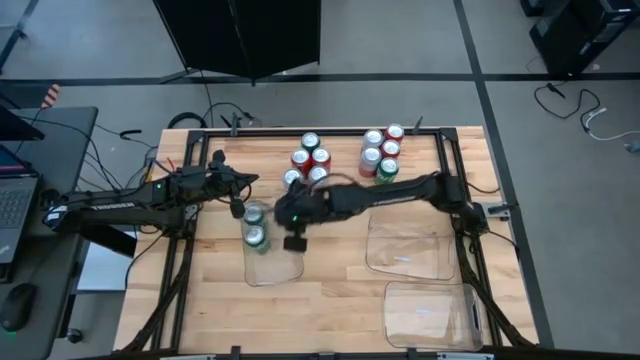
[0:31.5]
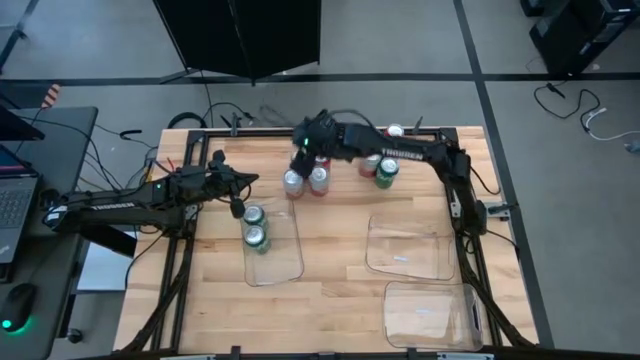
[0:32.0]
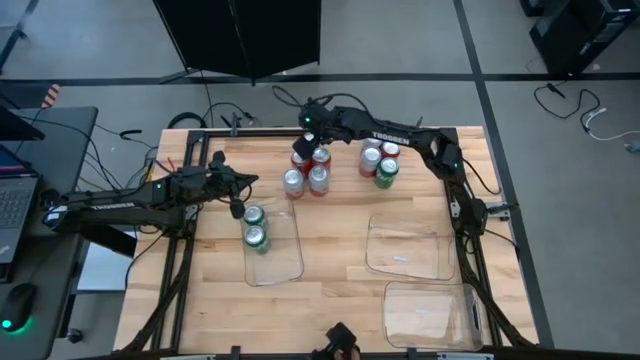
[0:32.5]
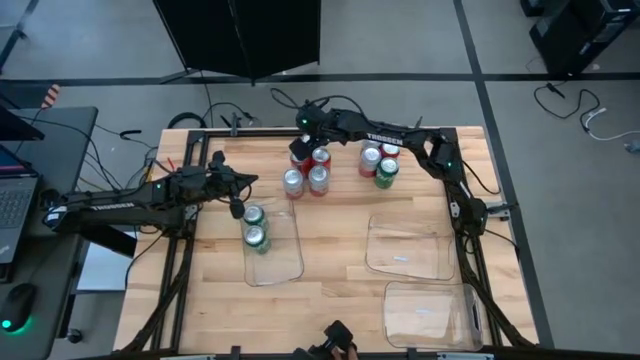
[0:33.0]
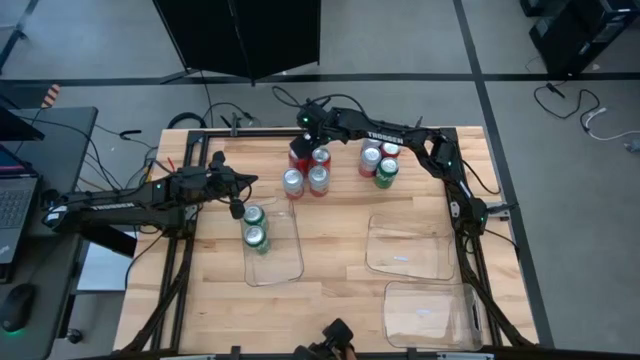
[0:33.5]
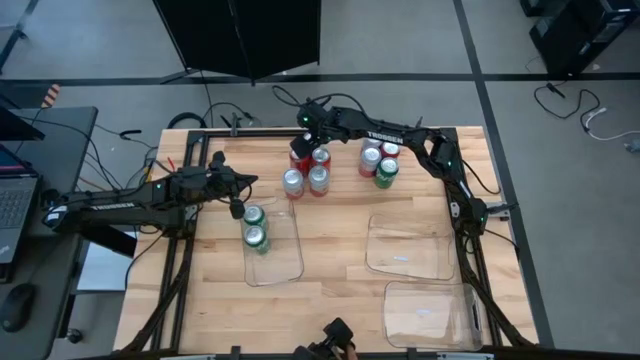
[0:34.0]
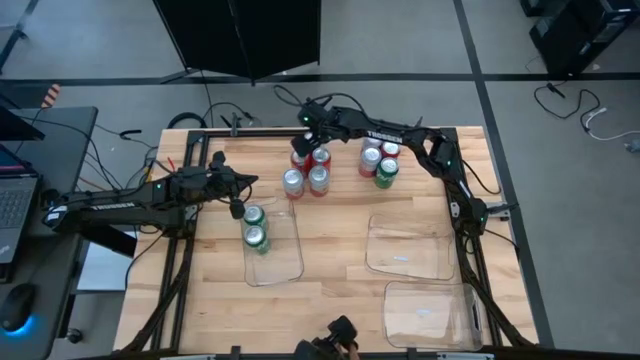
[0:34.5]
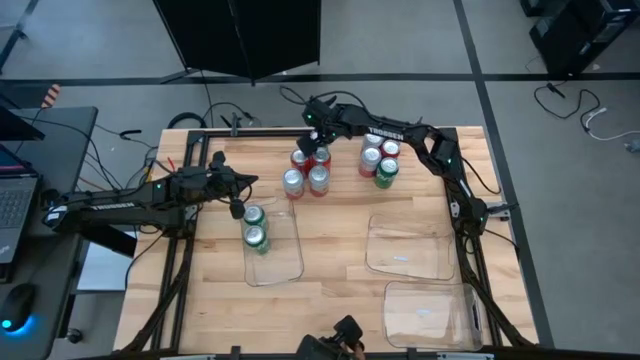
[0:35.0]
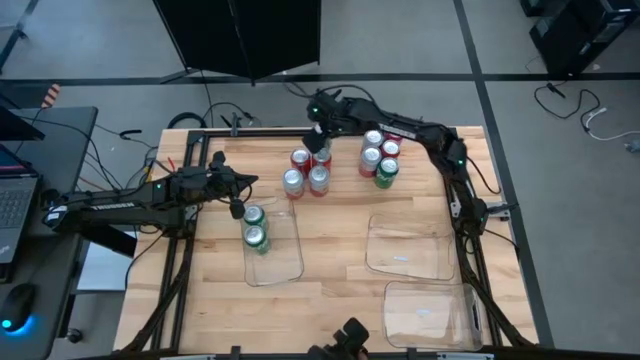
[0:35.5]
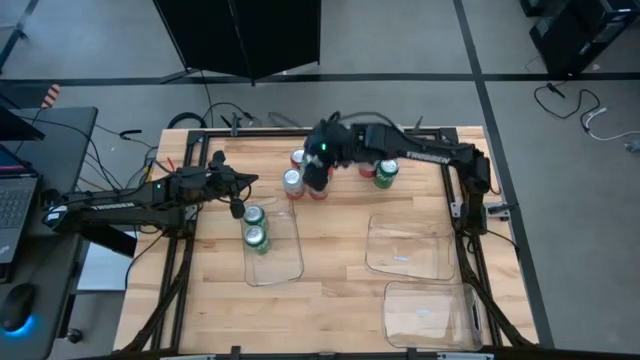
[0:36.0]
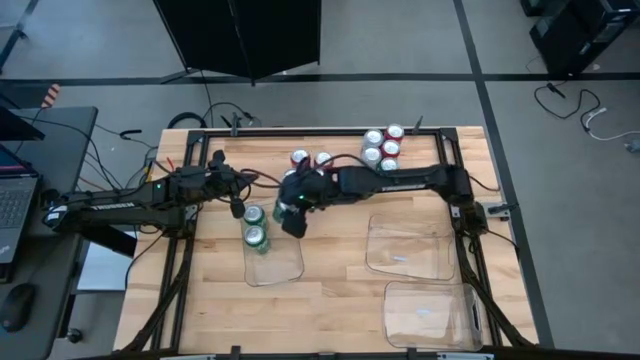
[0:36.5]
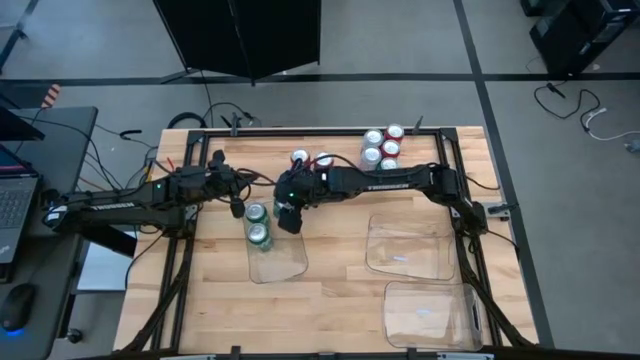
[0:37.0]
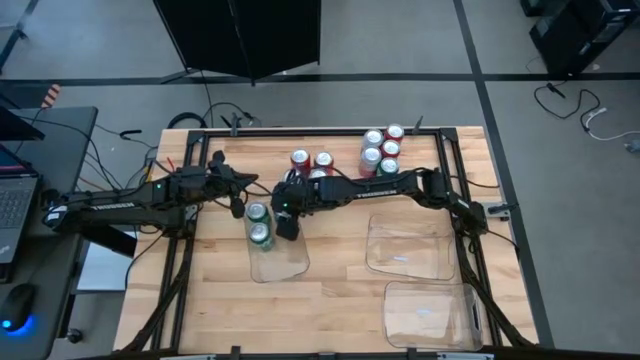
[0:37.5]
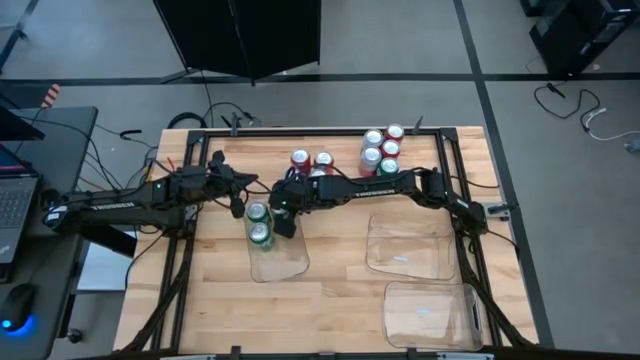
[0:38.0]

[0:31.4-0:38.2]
Task: Sort soda cans
Put the top green soda can into the top left transparent bin

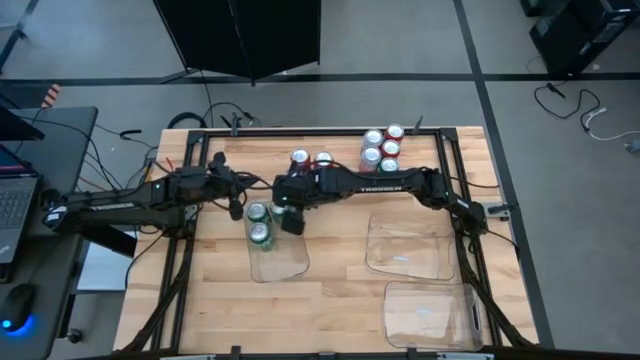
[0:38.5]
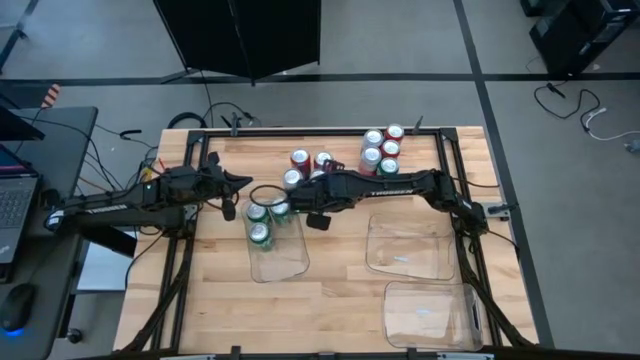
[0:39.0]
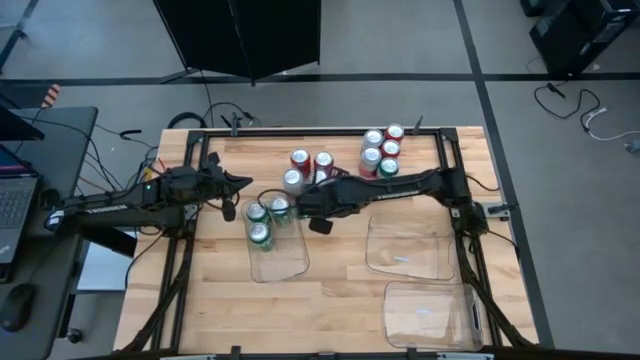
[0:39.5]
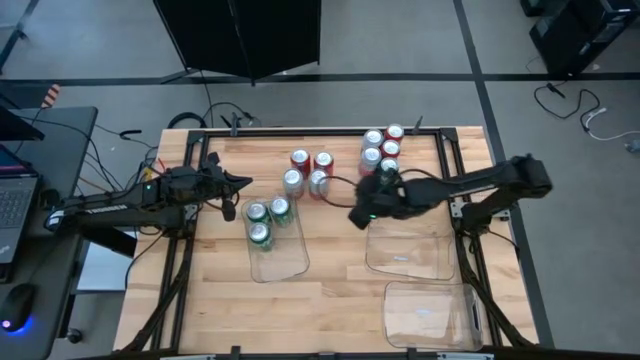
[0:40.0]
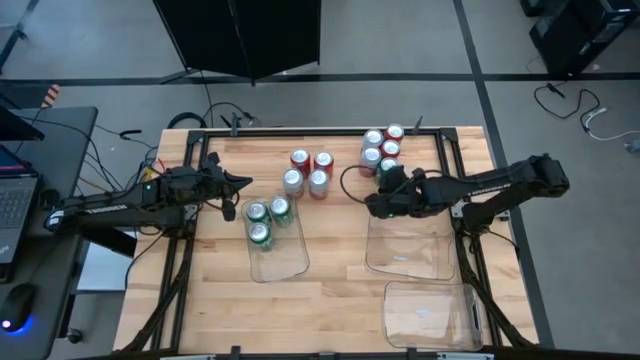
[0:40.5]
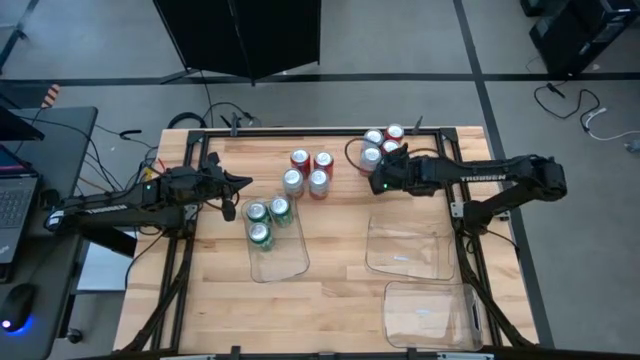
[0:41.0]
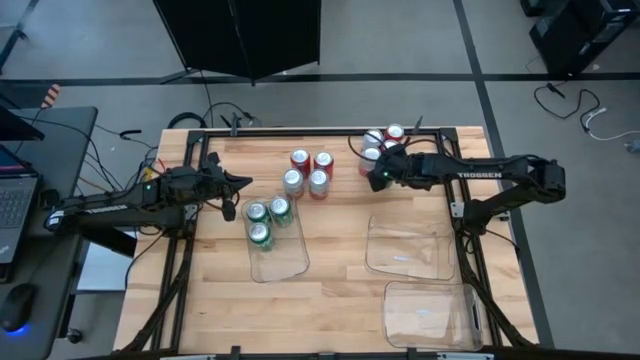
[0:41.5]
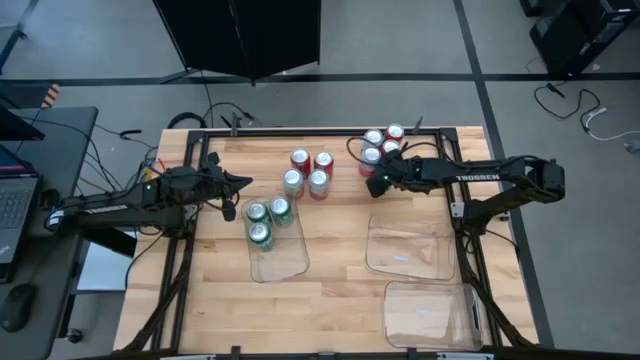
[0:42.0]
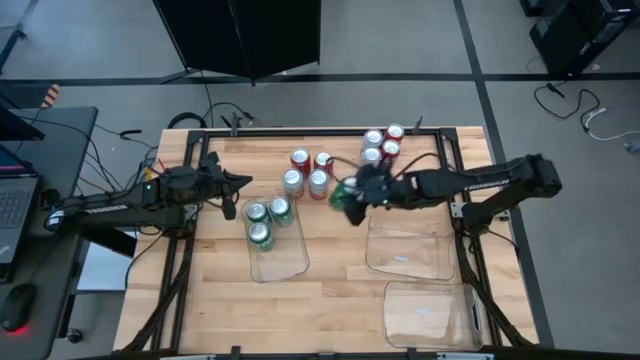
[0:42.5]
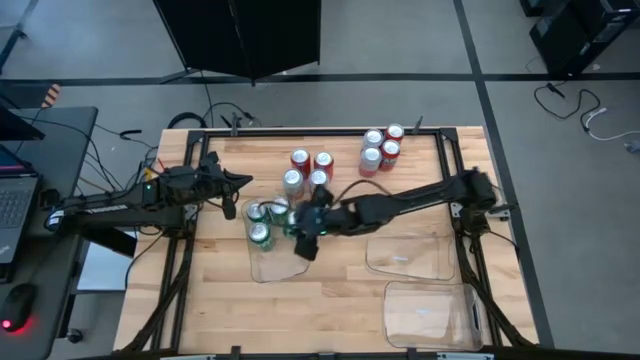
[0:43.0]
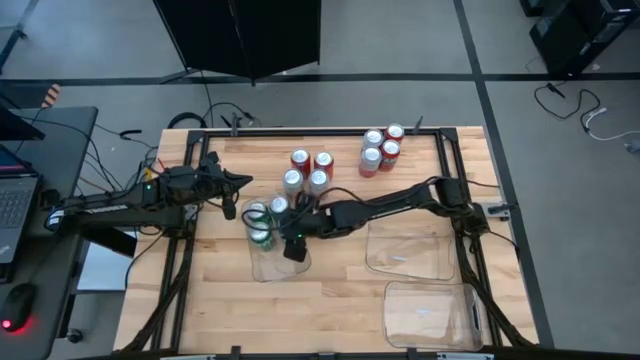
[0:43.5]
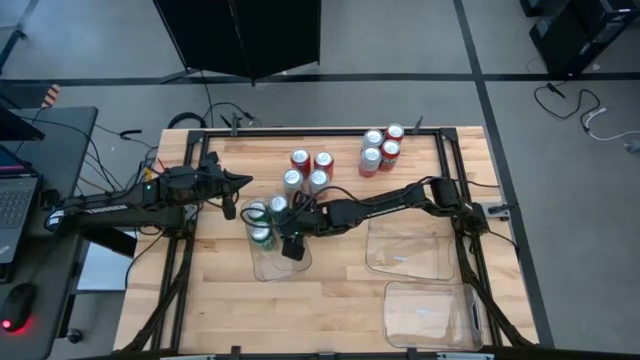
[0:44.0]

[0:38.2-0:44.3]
Put the green soda can into the top left transparent bin

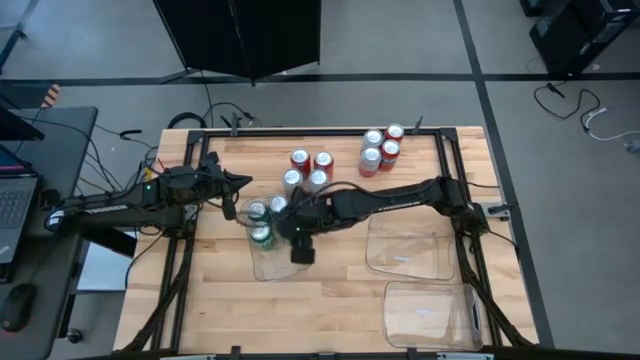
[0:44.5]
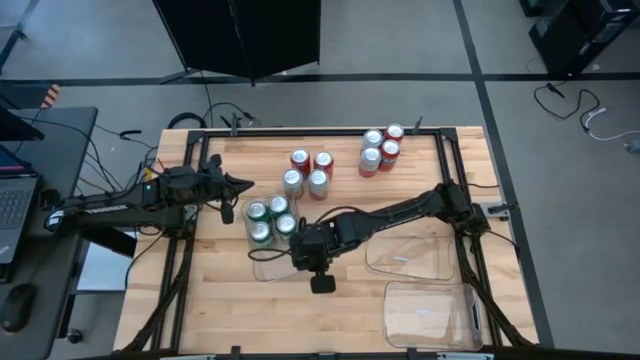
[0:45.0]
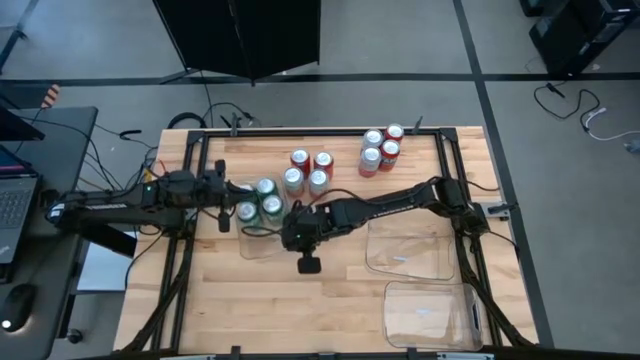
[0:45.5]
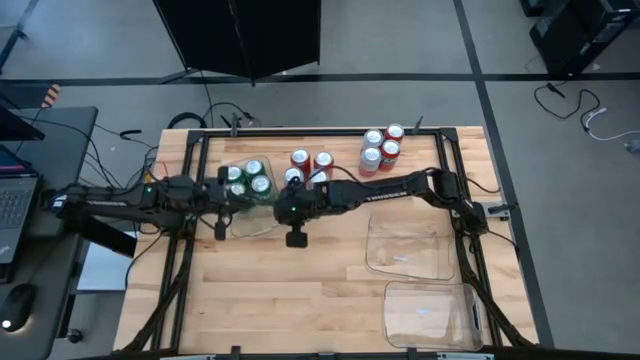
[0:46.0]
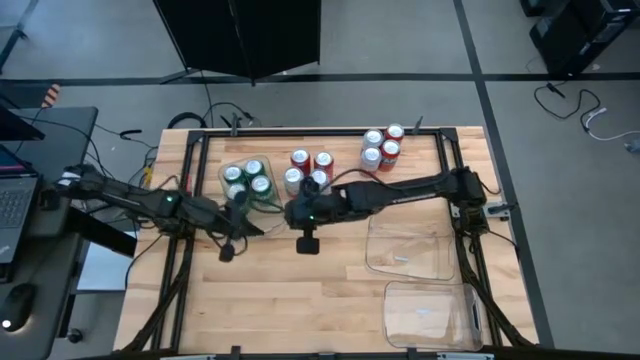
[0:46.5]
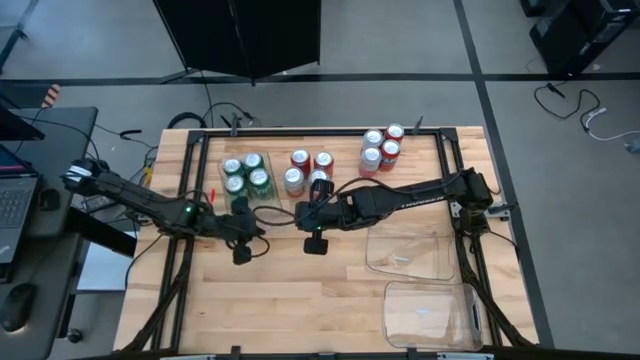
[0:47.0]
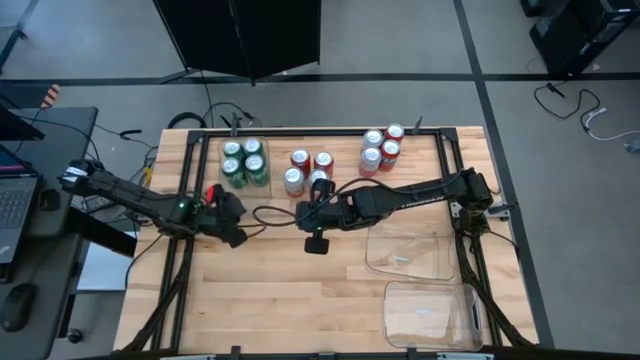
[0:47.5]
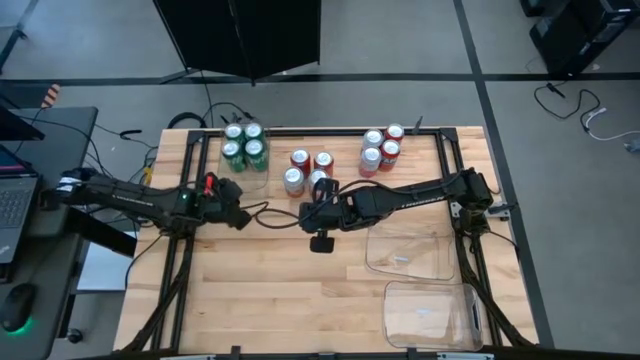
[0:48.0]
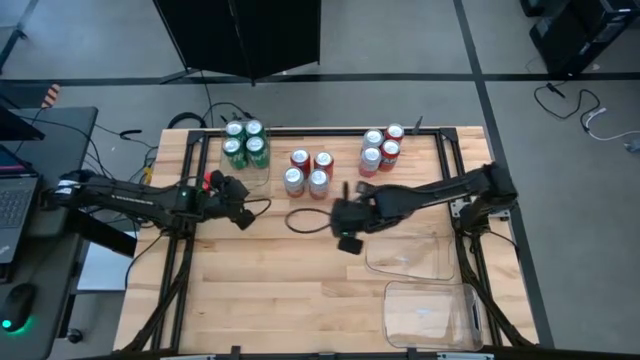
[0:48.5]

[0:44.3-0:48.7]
Move the top left transparent bin to the top left of the table

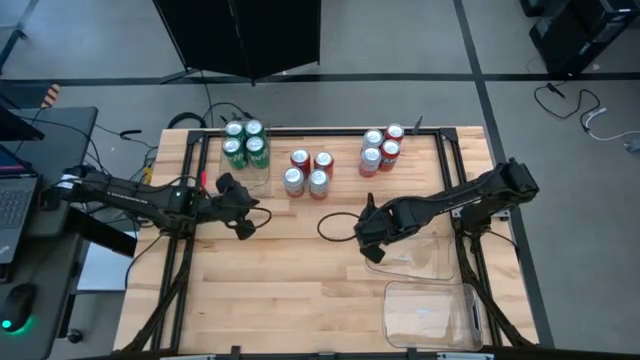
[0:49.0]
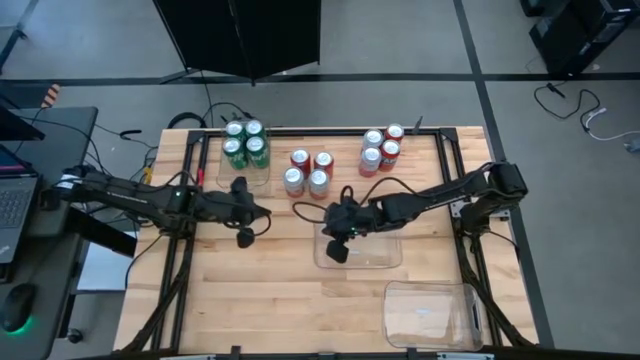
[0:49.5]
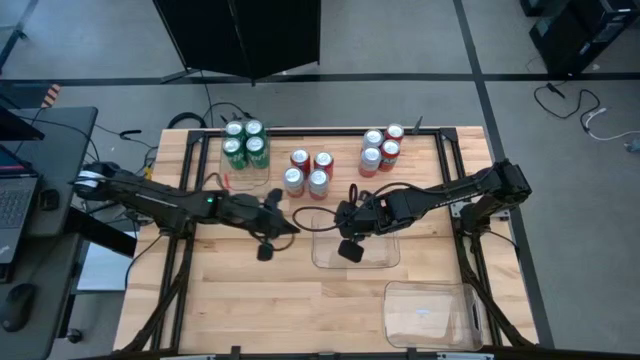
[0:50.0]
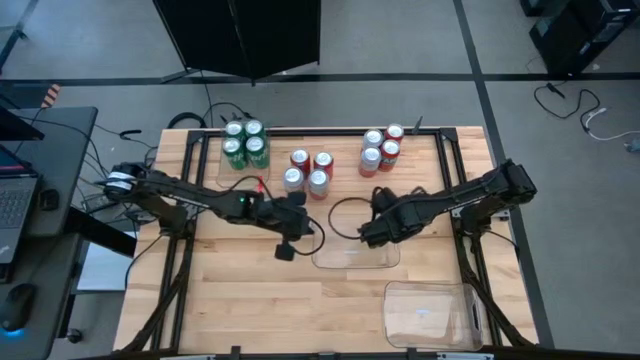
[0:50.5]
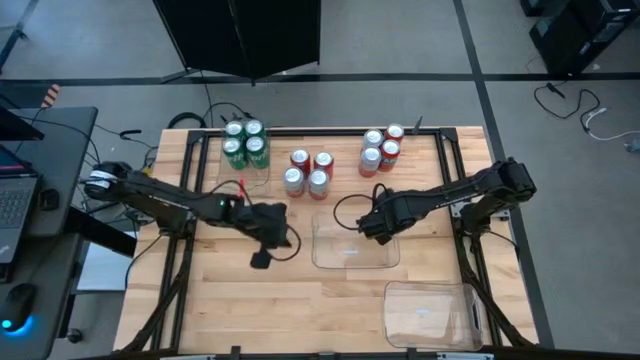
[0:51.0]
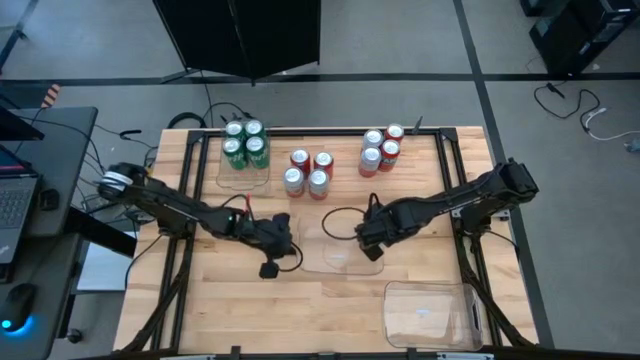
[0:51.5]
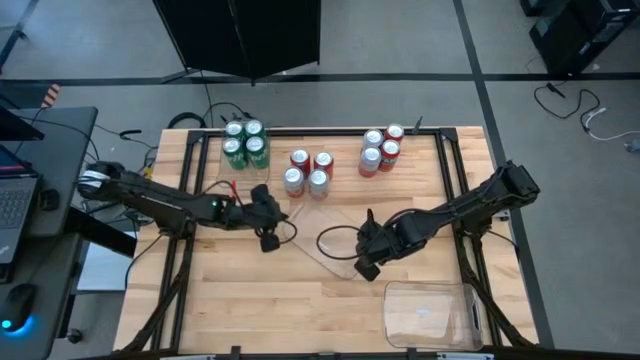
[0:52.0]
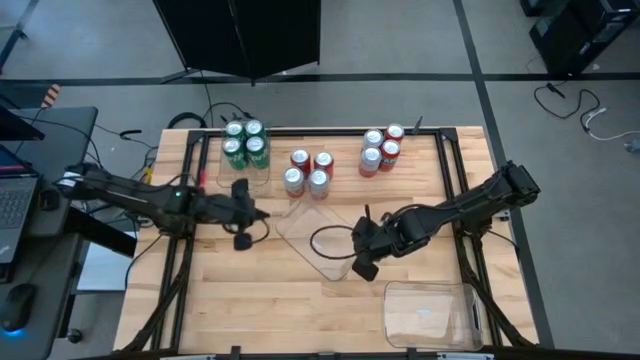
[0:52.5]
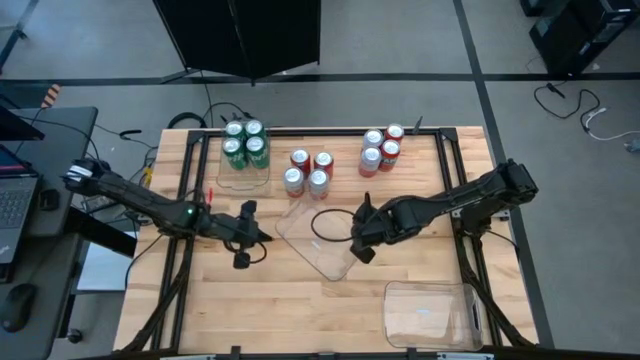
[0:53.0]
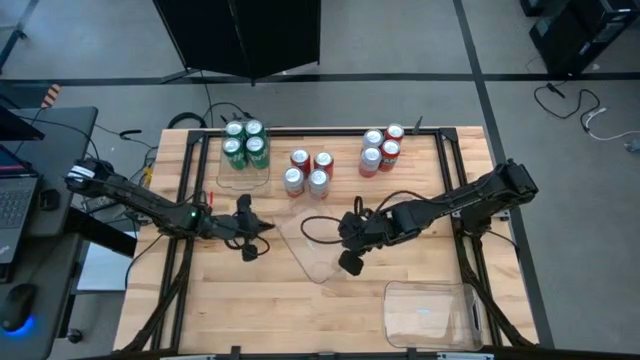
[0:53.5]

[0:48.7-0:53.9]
Move the middle right transparent bin to the center of the table
